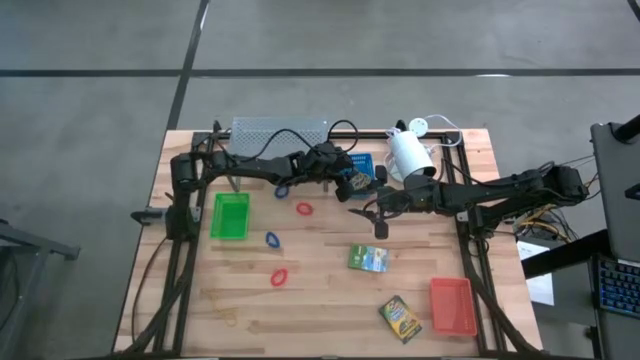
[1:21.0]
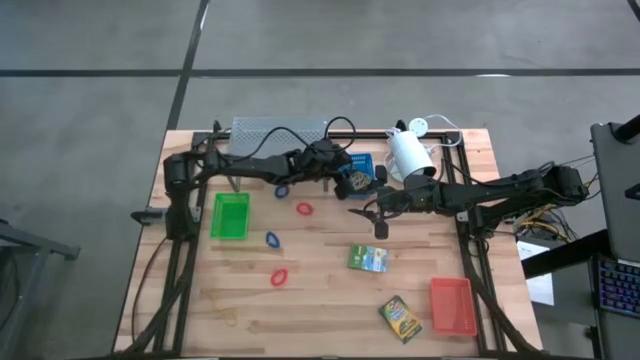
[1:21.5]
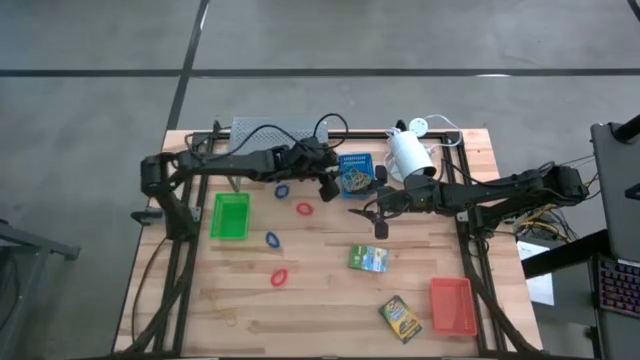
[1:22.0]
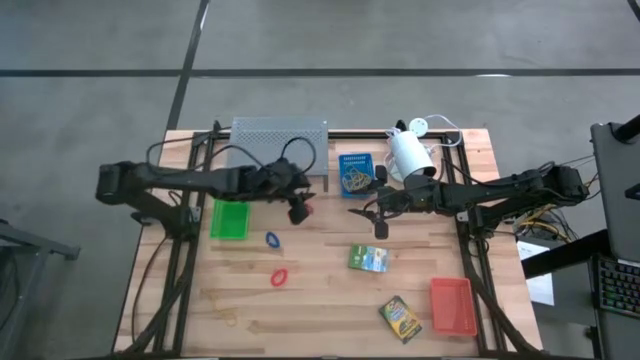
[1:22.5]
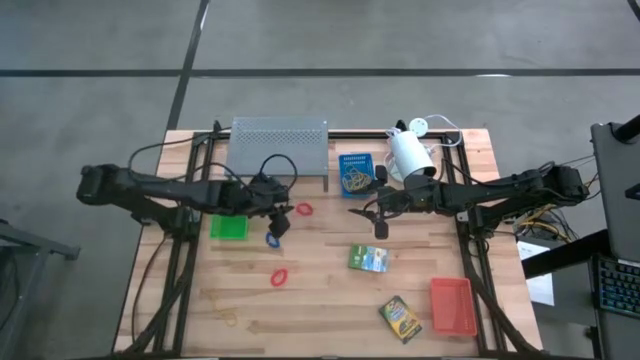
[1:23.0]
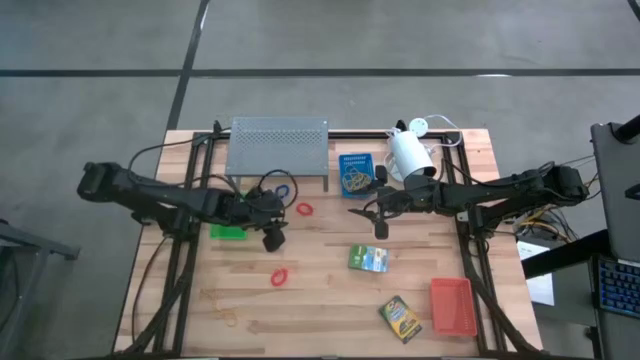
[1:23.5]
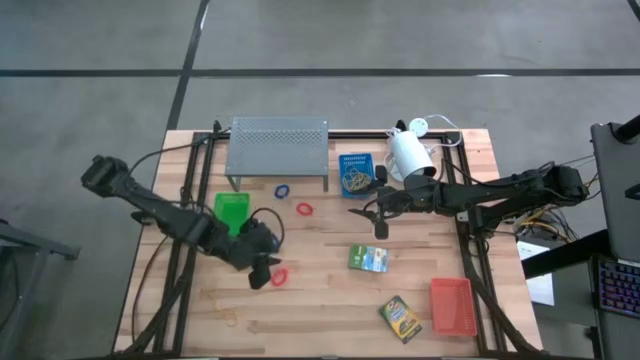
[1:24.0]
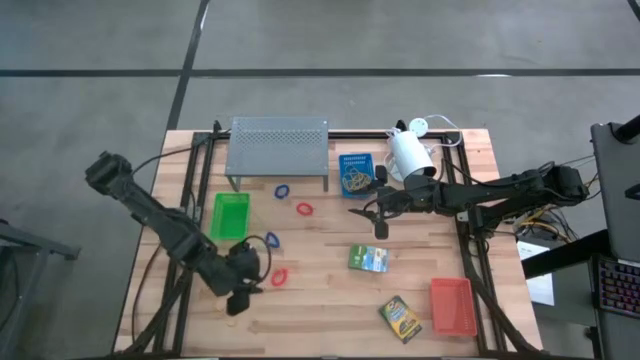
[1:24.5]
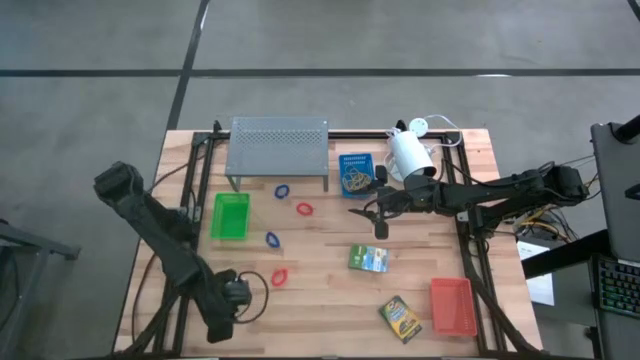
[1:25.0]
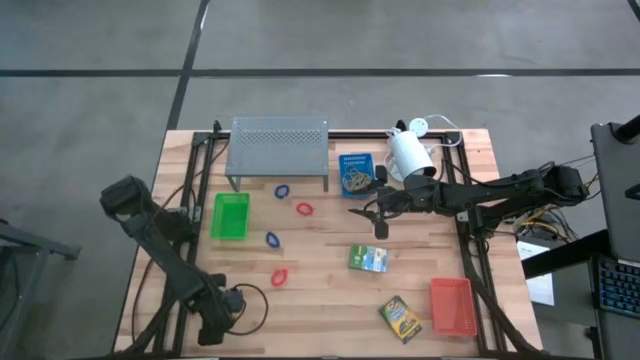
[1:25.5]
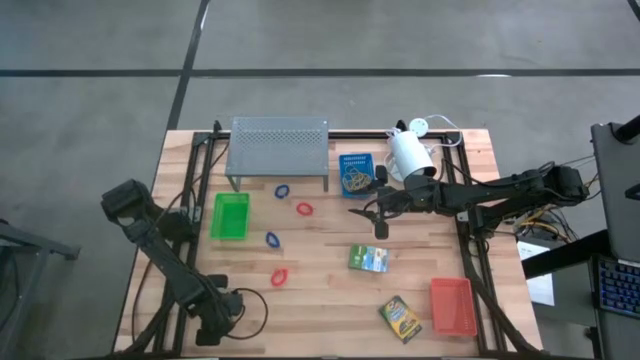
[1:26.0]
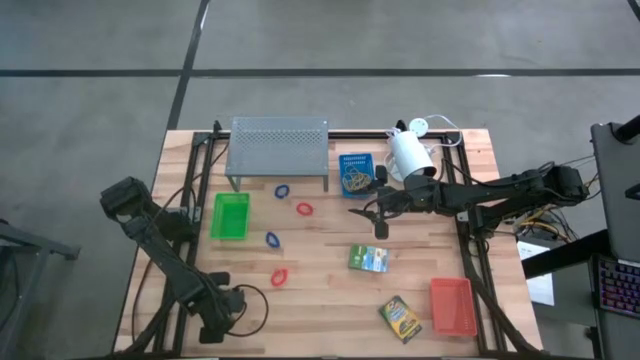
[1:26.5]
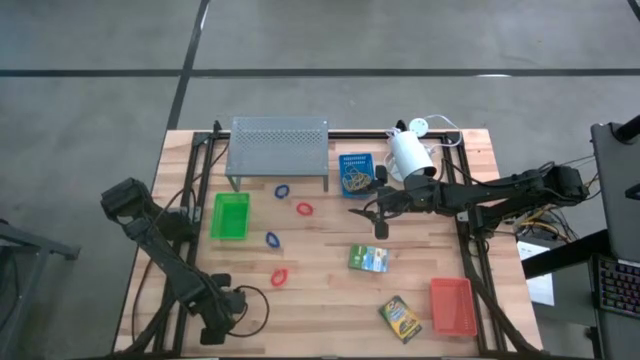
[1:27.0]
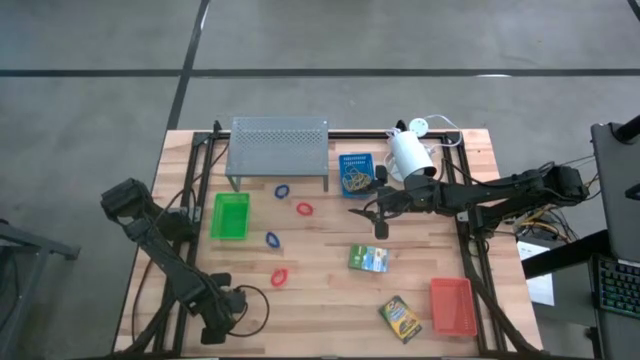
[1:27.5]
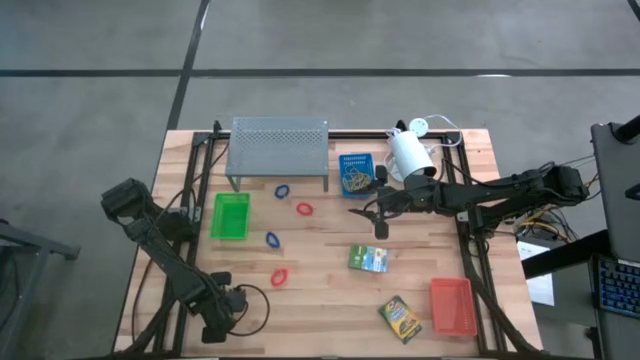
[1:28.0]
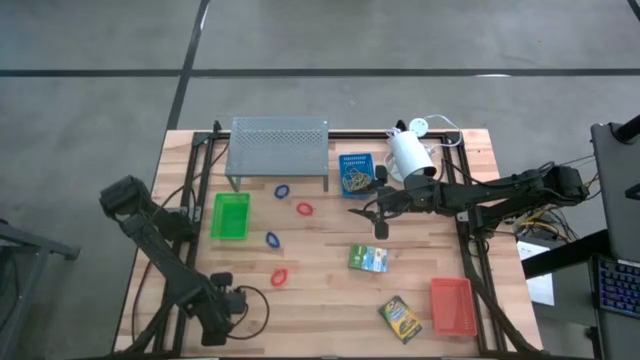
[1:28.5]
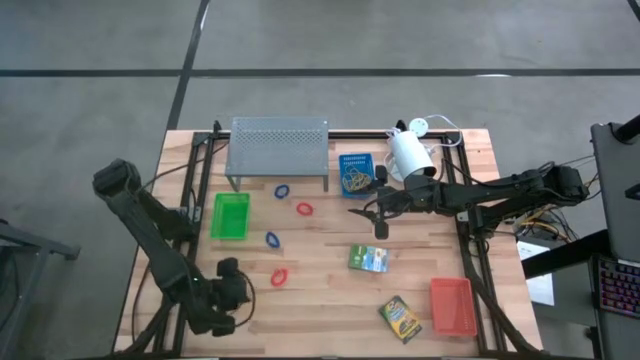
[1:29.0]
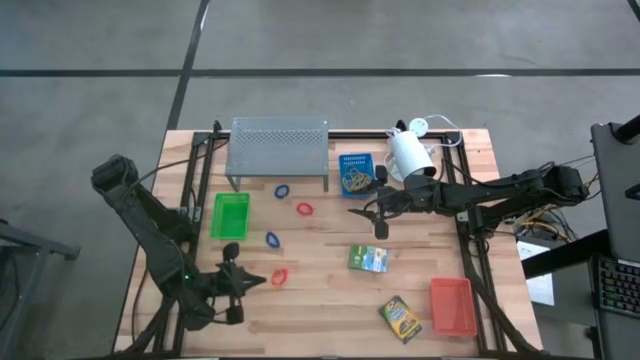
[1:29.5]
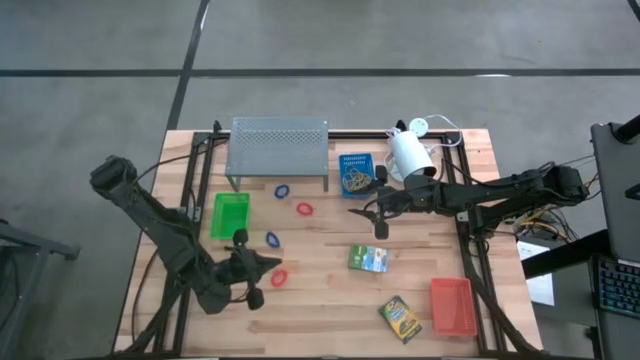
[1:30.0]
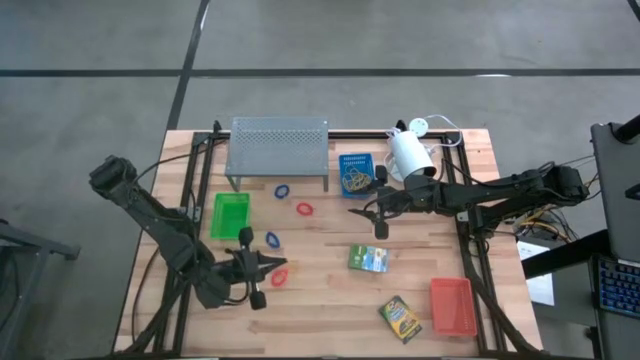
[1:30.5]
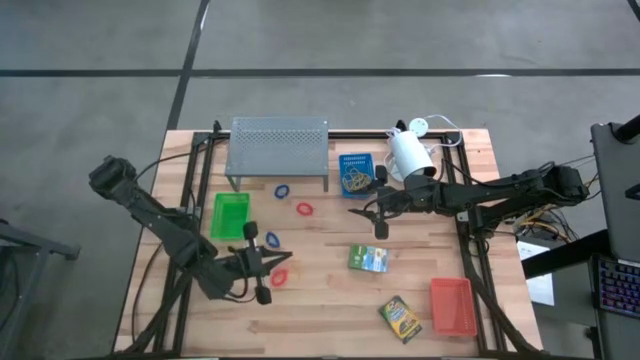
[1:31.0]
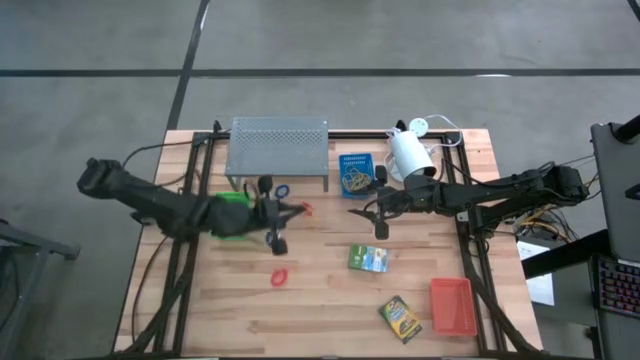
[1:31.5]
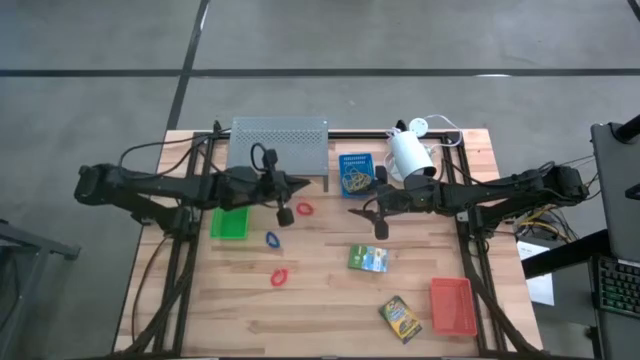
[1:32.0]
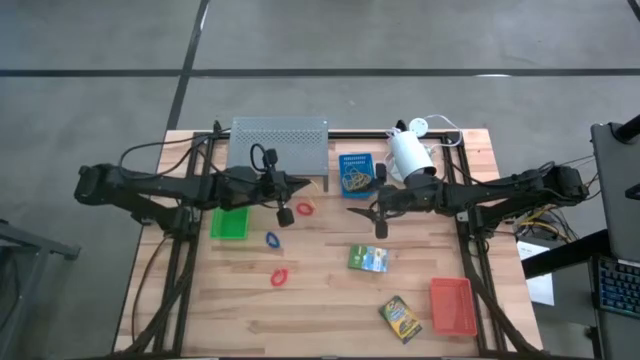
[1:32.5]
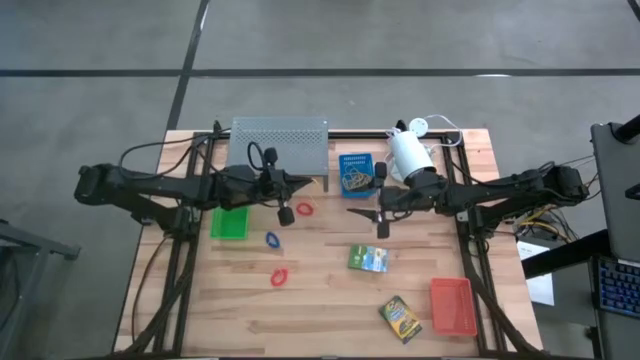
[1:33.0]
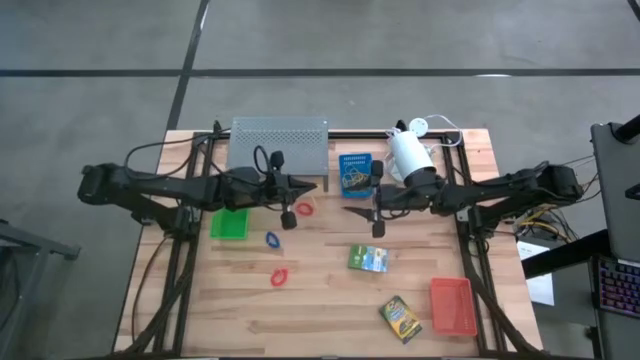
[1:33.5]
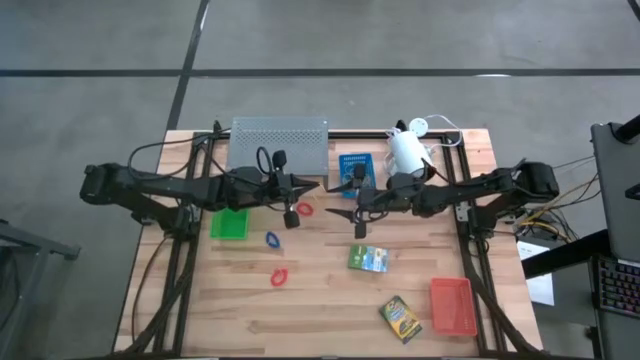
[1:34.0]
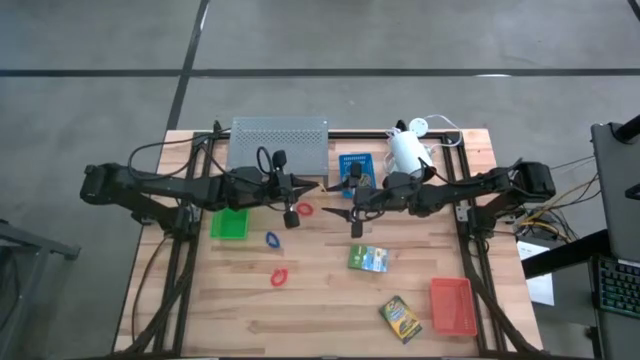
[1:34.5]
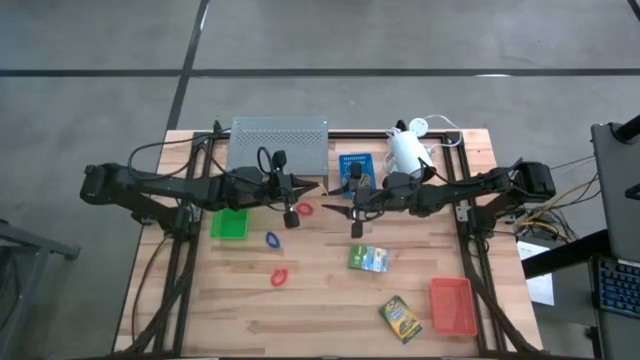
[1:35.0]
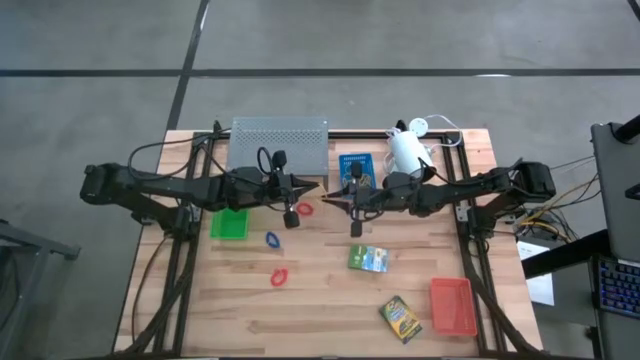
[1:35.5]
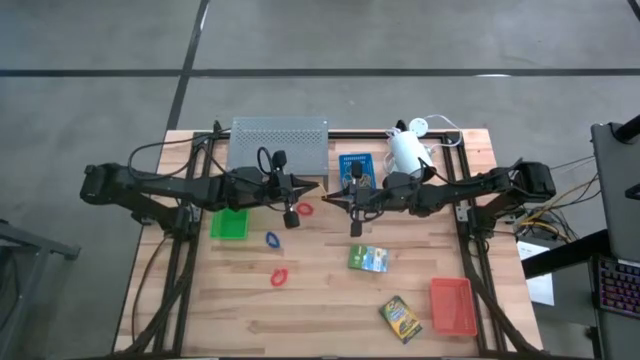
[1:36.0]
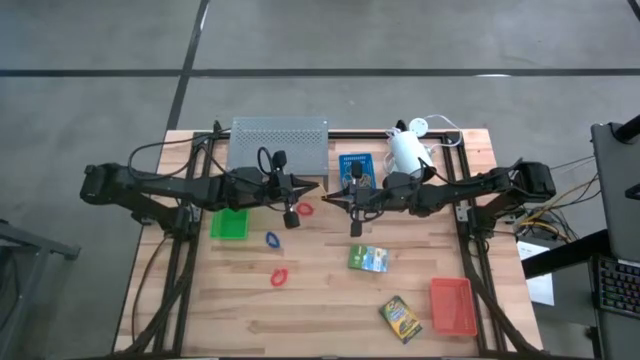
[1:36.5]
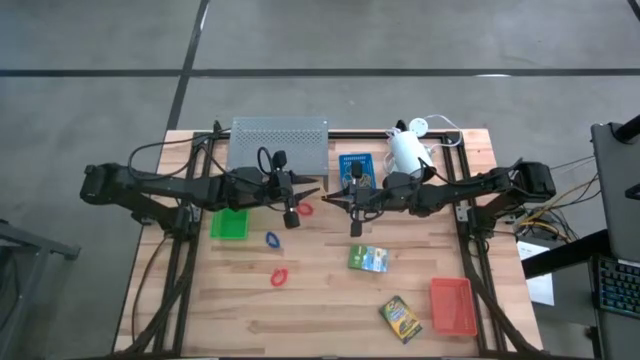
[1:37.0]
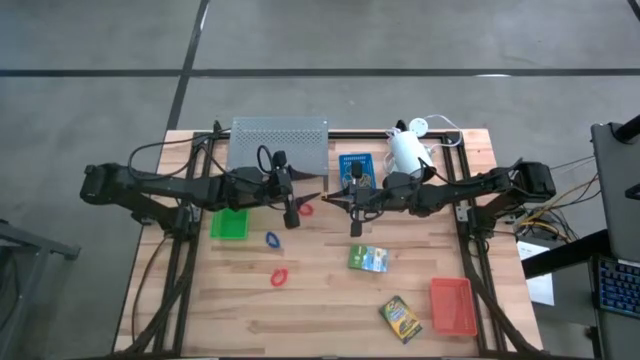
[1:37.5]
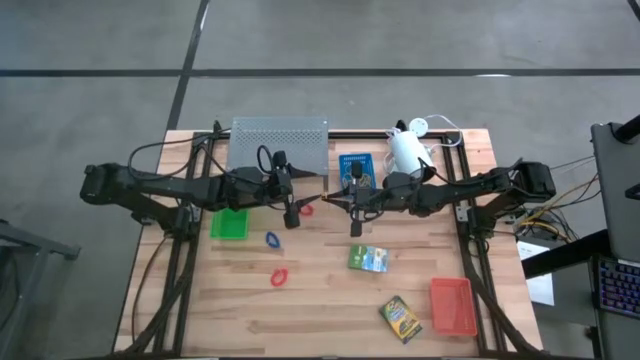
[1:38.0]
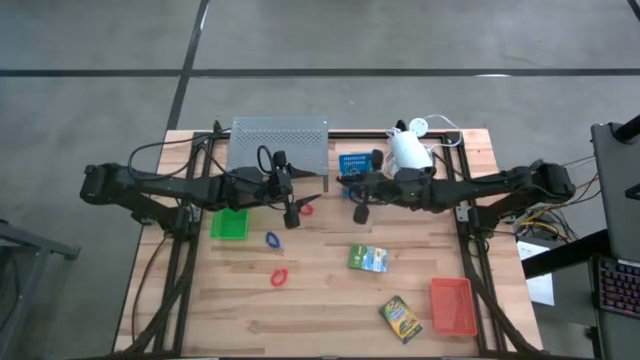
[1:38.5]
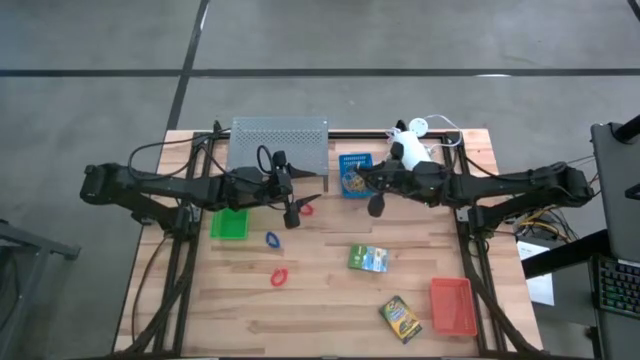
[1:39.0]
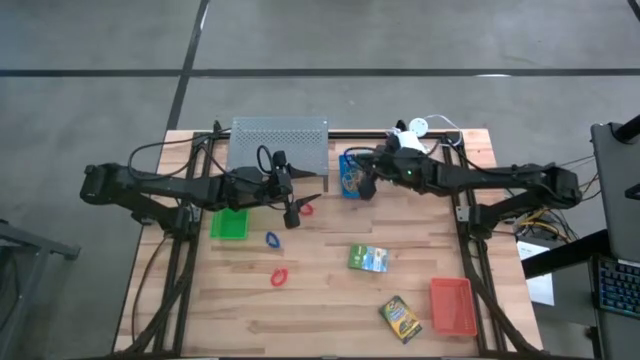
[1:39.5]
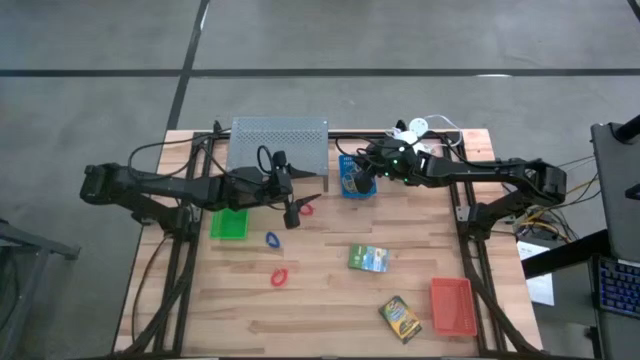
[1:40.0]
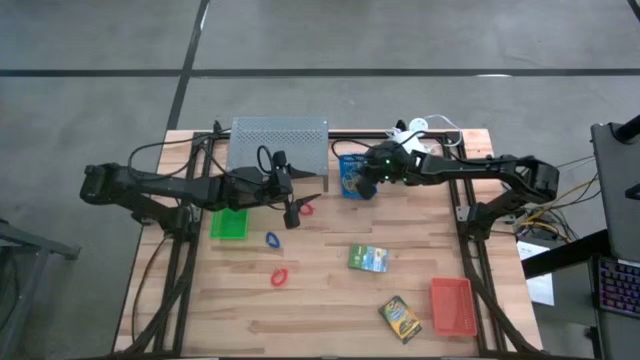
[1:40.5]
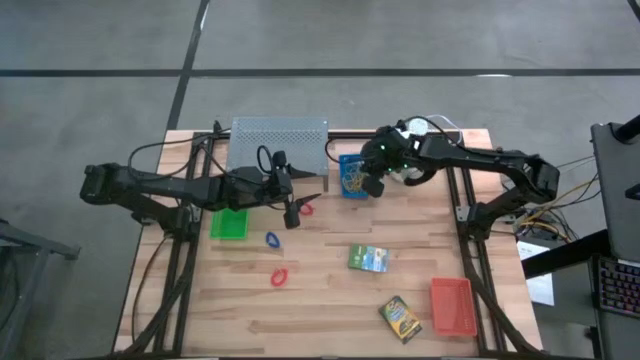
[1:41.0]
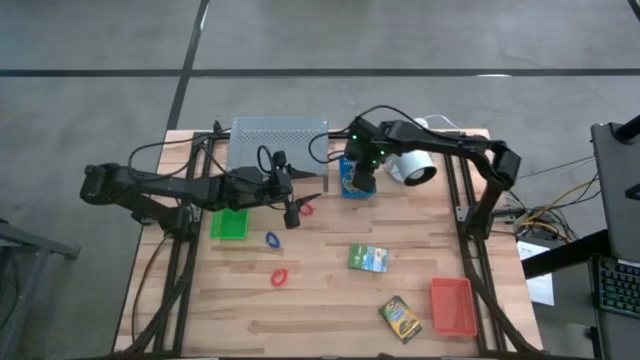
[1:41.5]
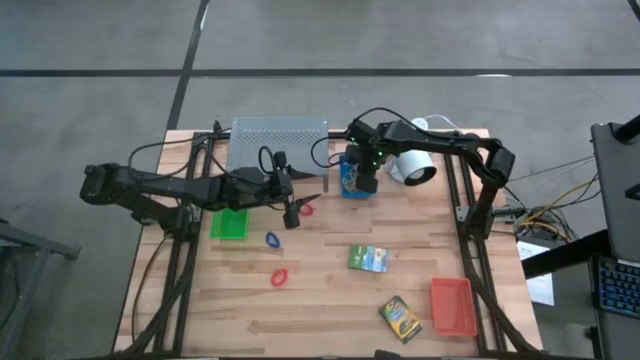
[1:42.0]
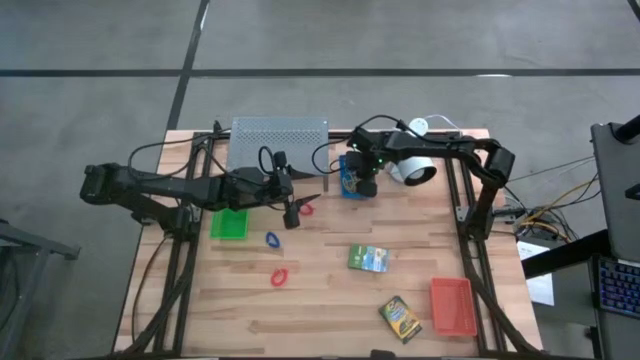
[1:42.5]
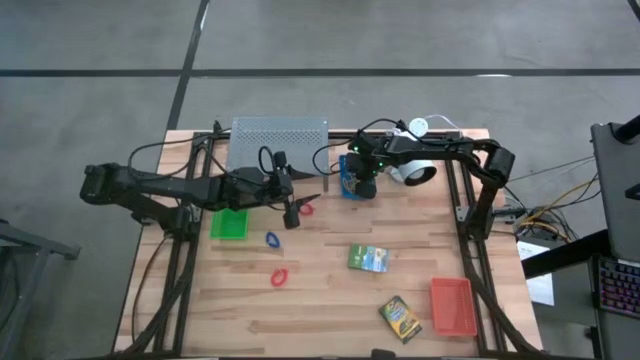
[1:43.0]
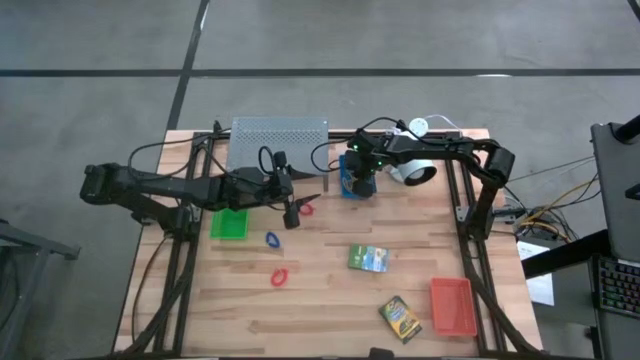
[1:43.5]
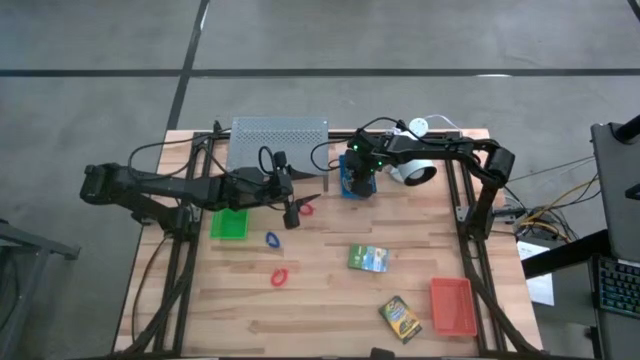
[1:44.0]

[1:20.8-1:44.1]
Task: Pick & Place Office Desk Supplies
Put the yellow rubber band into the blue bin
